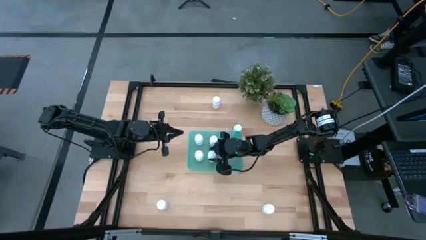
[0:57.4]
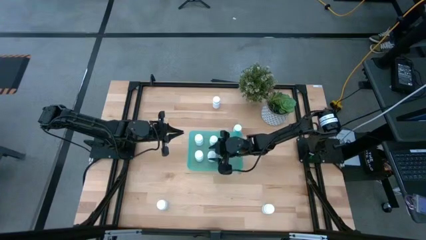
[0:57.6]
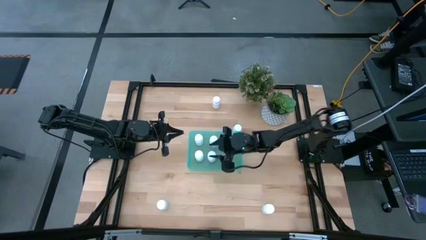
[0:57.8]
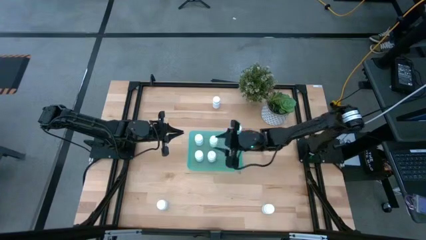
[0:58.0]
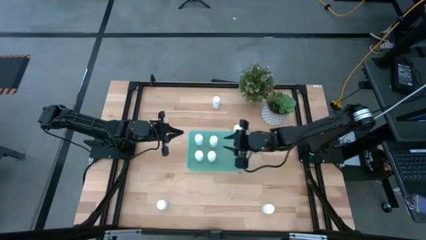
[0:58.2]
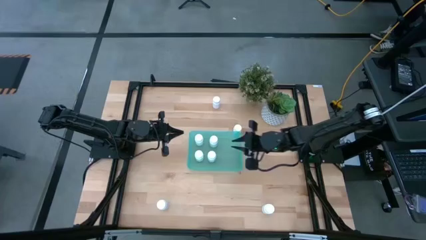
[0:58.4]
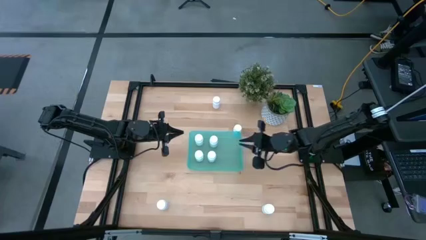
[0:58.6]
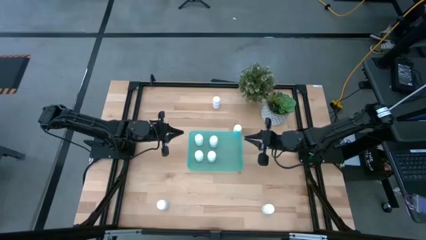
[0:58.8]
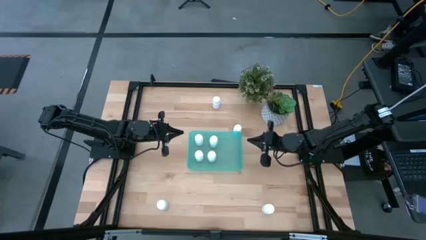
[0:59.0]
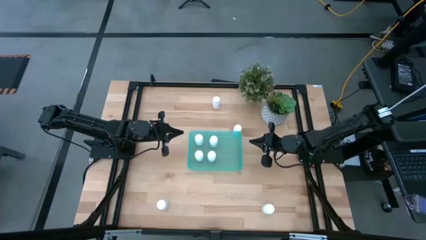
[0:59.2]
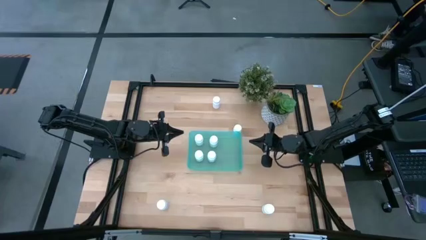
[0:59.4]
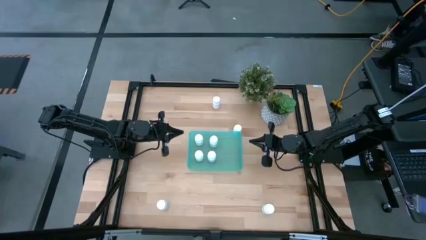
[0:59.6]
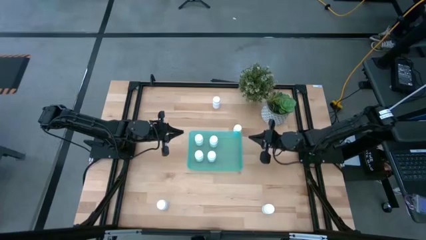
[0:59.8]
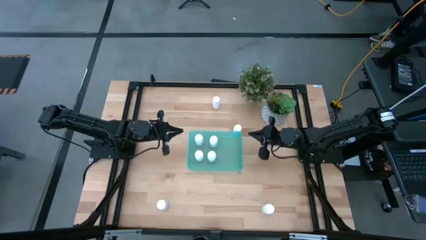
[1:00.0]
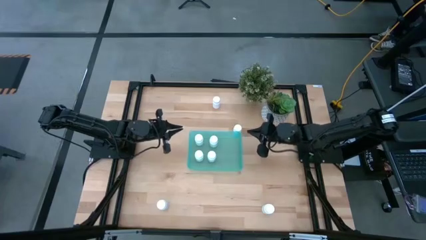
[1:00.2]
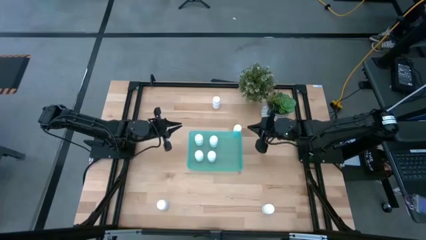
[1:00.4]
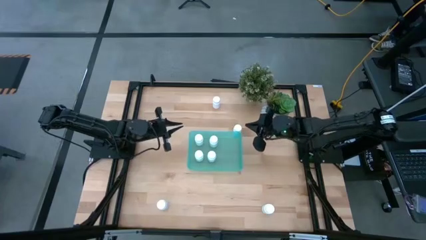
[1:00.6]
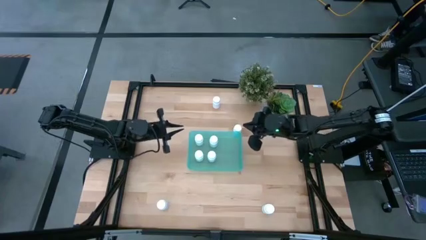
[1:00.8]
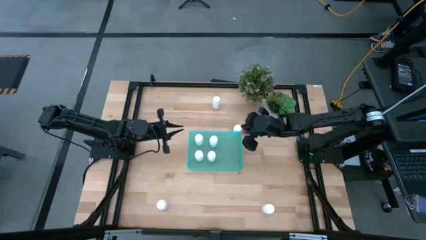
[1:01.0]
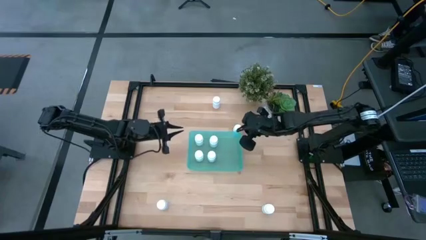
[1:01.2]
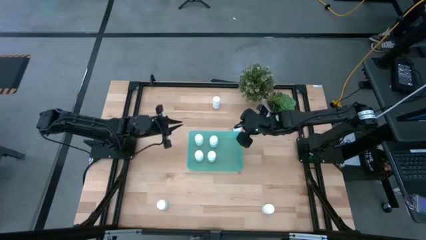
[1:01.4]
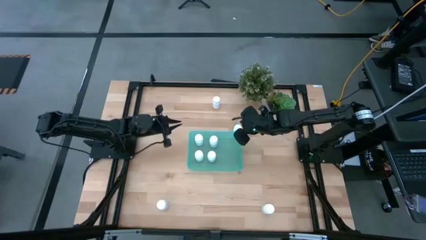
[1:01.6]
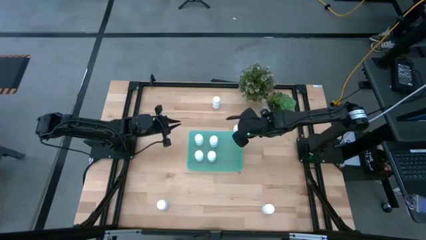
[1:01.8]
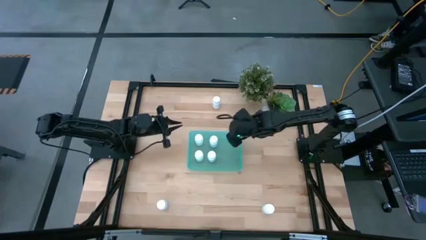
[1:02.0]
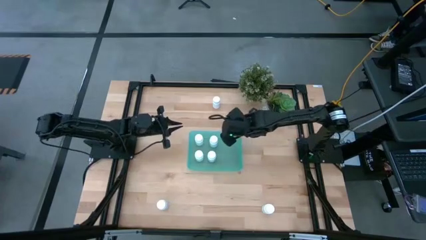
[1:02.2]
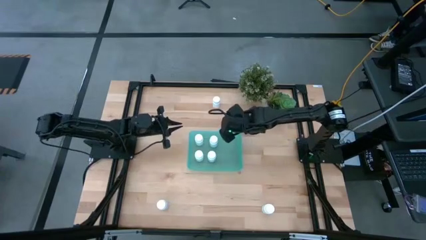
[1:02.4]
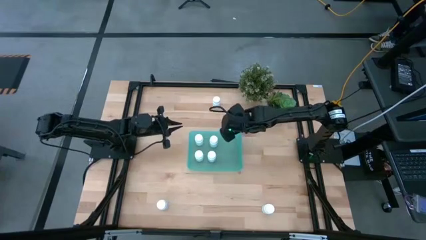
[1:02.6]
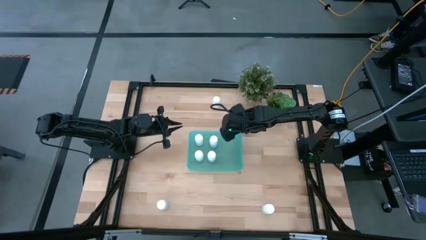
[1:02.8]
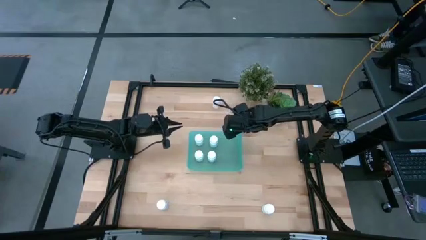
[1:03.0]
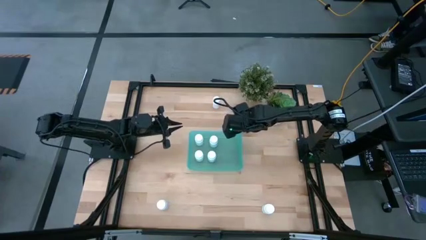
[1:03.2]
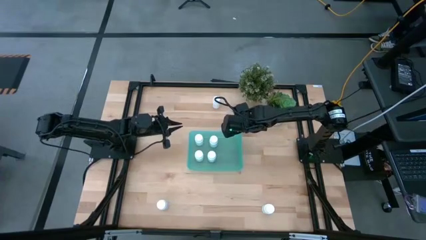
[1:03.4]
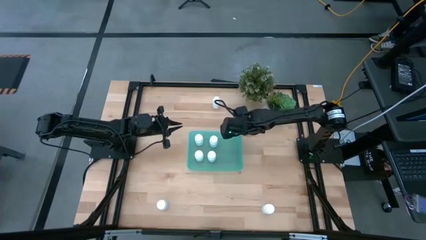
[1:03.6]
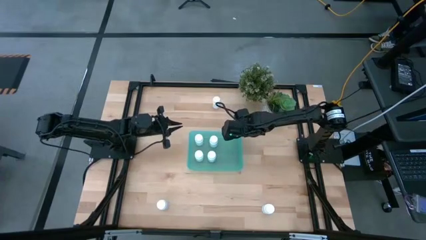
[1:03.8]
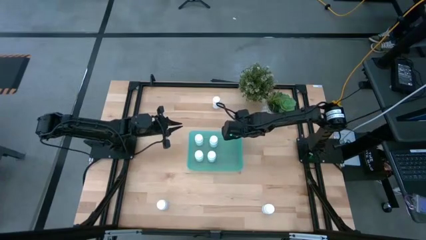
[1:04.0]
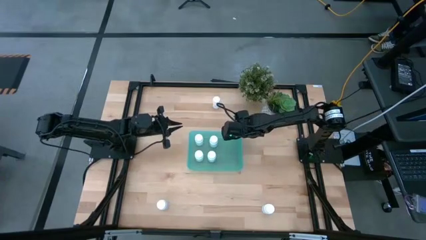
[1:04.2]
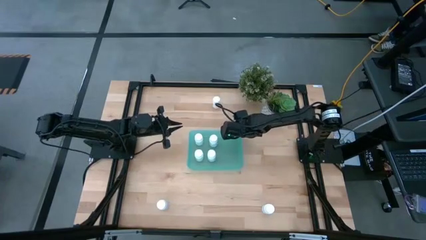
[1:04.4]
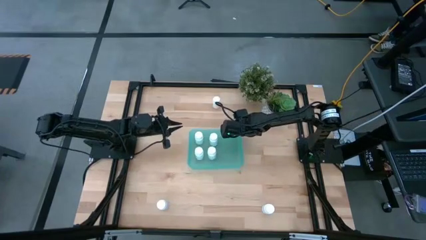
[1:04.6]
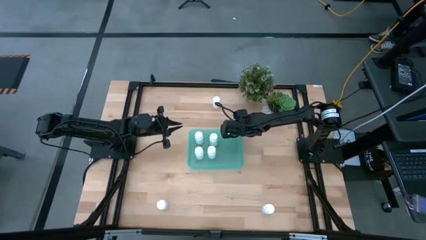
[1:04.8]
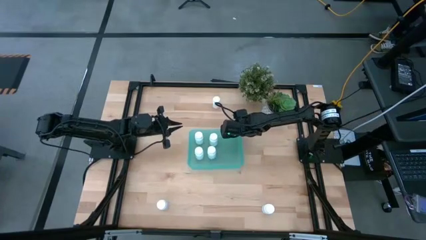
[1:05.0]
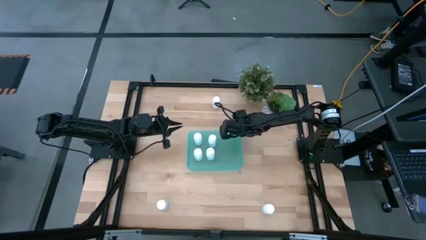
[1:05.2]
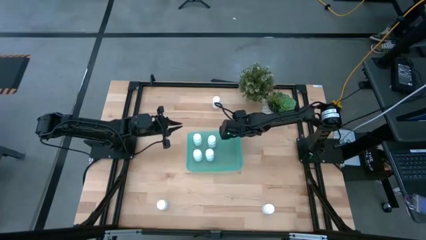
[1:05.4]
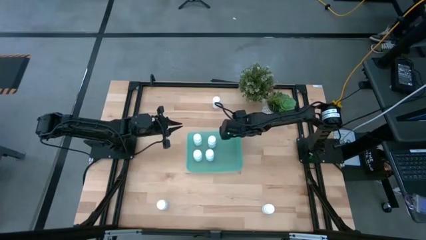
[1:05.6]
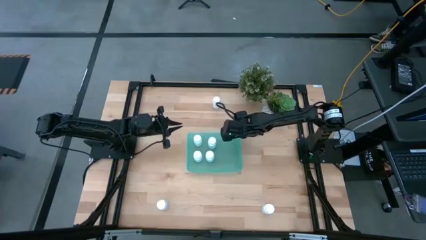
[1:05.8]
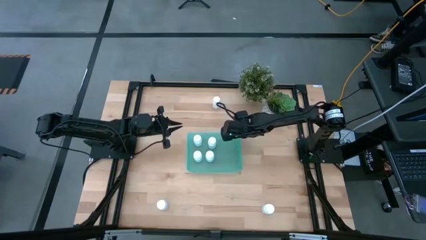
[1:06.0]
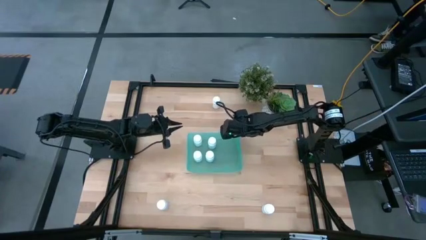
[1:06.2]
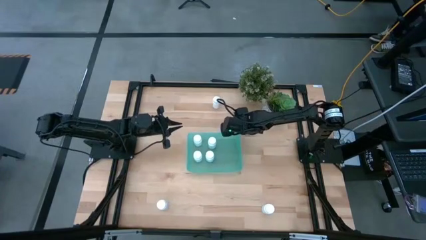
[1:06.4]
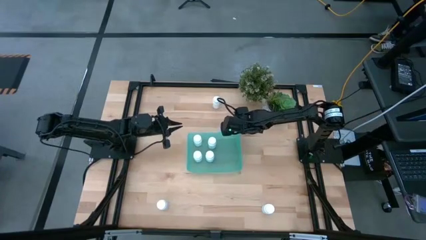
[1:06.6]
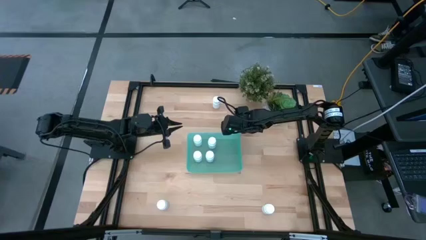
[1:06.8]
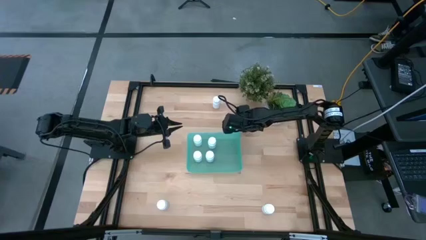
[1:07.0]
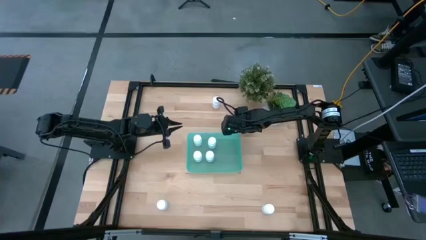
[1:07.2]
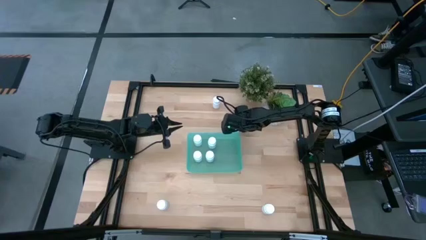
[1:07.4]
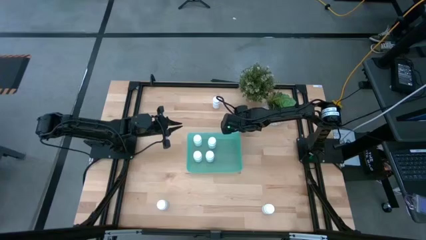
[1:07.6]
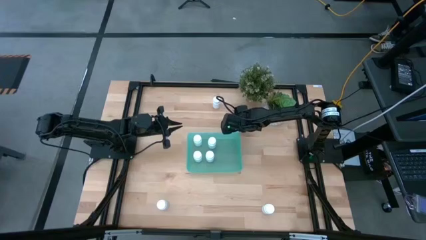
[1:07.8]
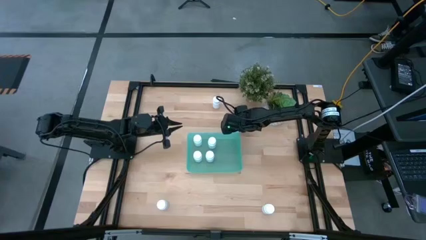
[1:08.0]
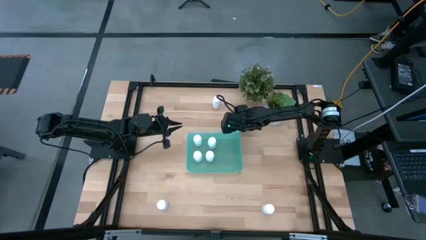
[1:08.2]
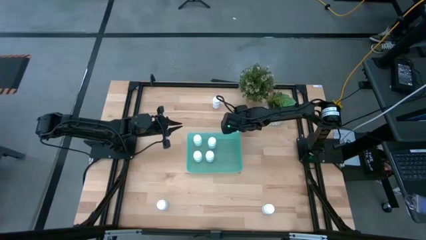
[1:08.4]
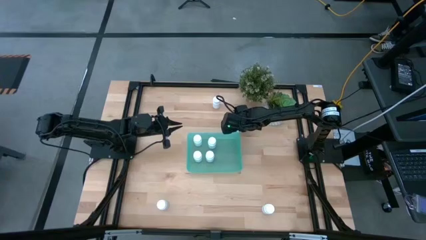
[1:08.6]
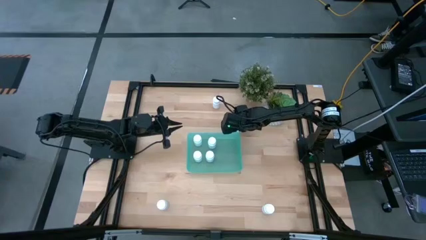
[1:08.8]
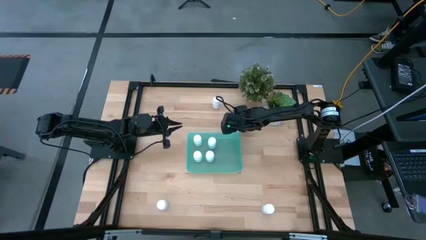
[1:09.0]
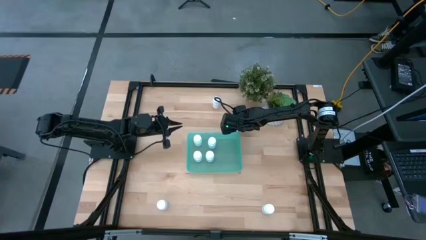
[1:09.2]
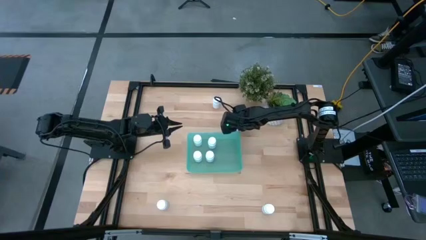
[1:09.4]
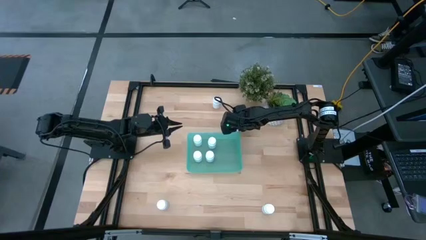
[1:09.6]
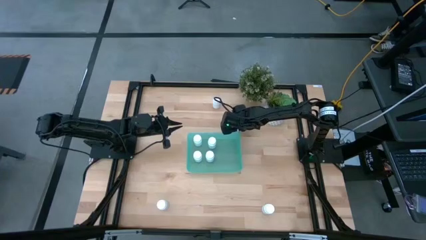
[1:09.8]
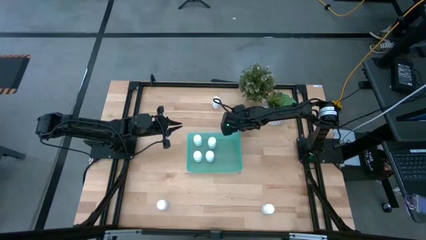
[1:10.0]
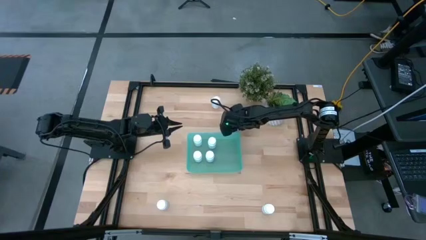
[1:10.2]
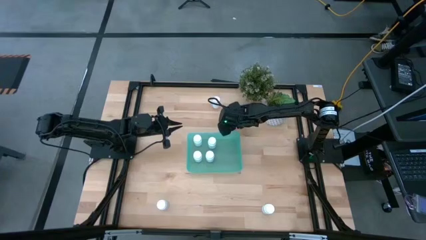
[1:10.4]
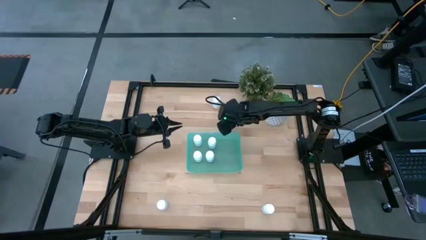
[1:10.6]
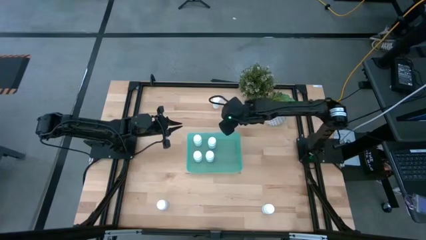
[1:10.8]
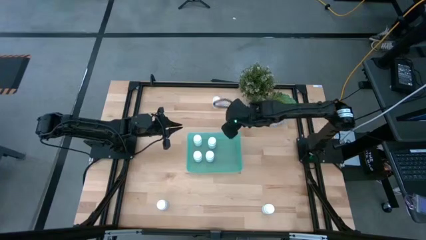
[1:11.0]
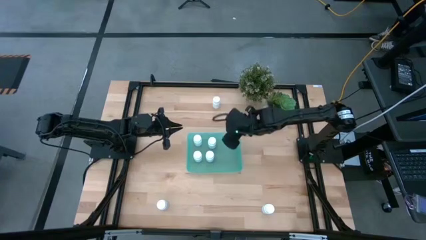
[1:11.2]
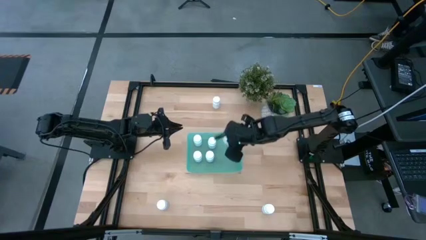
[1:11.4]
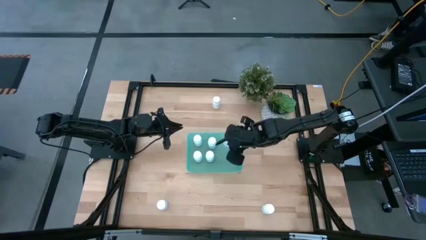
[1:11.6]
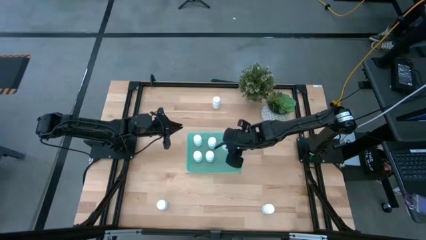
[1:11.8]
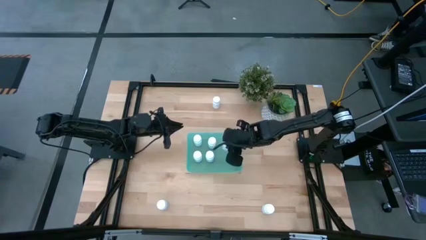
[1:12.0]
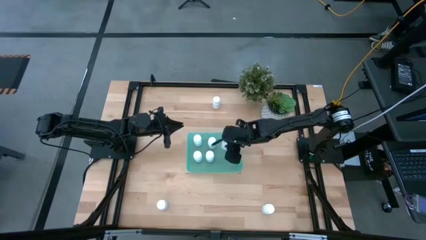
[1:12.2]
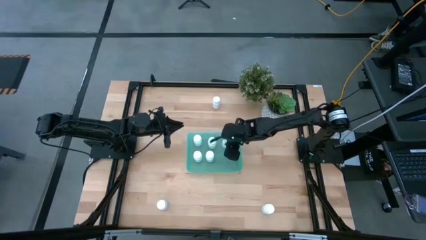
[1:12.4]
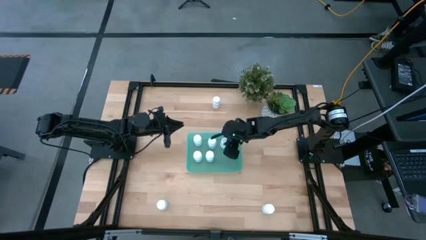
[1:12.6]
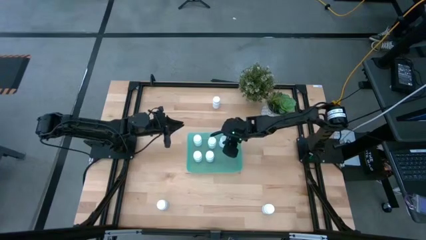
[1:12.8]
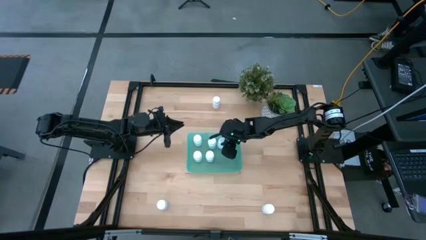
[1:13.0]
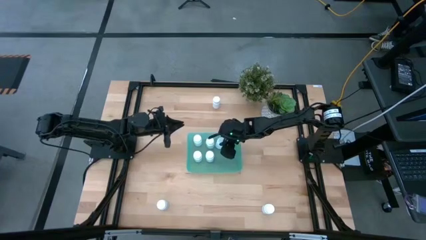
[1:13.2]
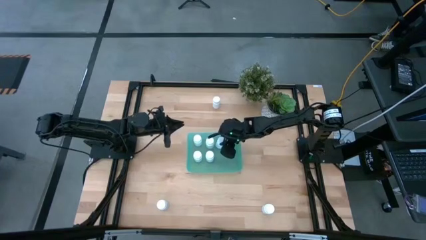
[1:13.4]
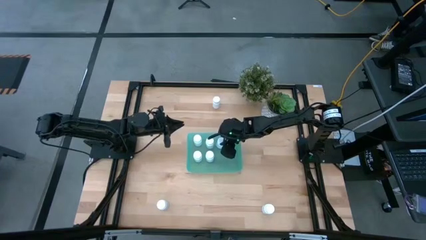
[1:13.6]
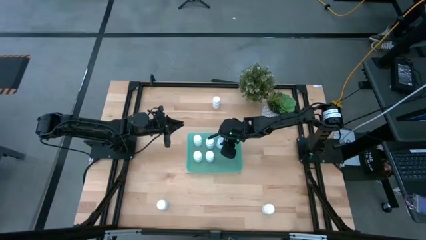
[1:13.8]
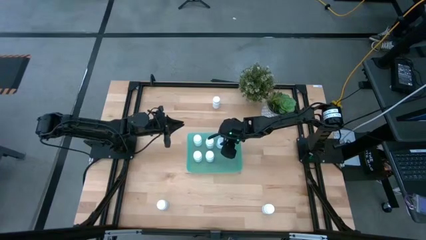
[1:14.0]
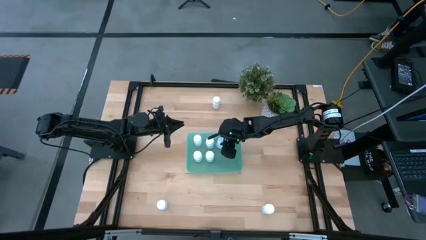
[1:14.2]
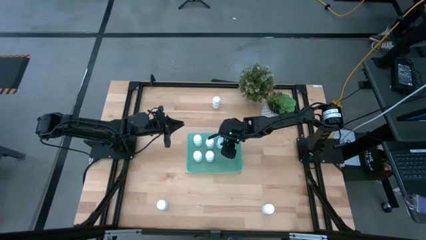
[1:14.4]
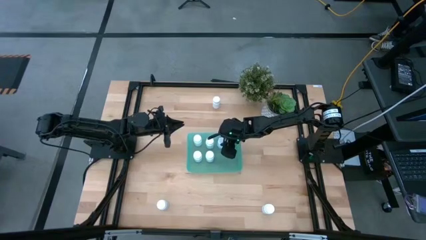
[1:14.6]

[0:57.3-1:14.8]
Task: Pick and place pill bottles into a basket
Put the white pill bottle into the blue bin
